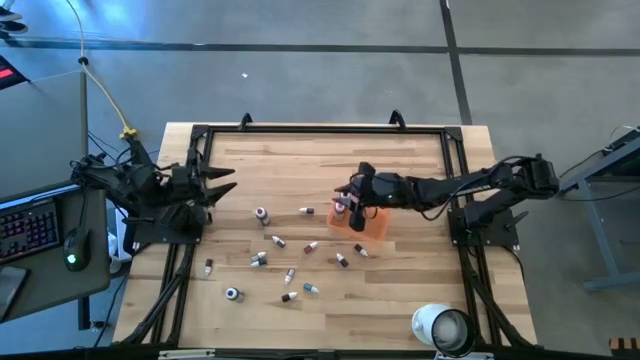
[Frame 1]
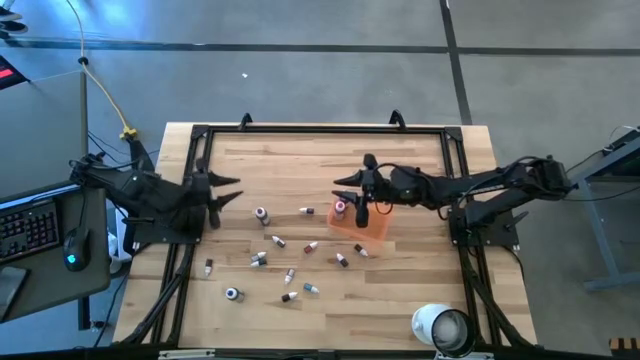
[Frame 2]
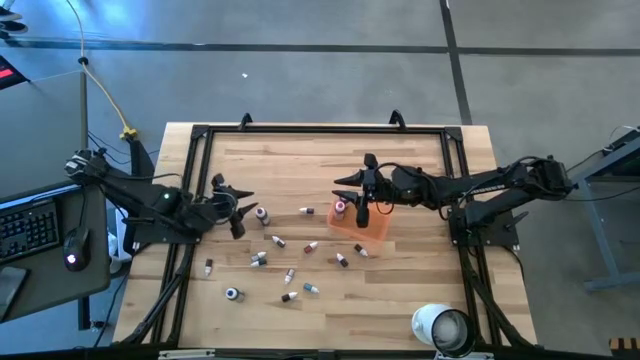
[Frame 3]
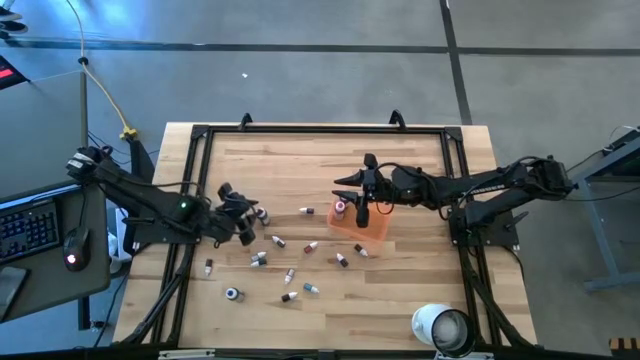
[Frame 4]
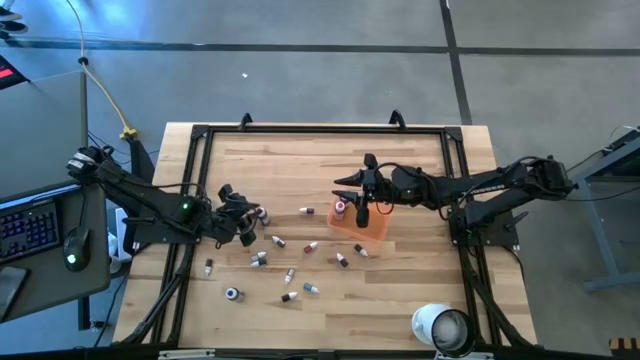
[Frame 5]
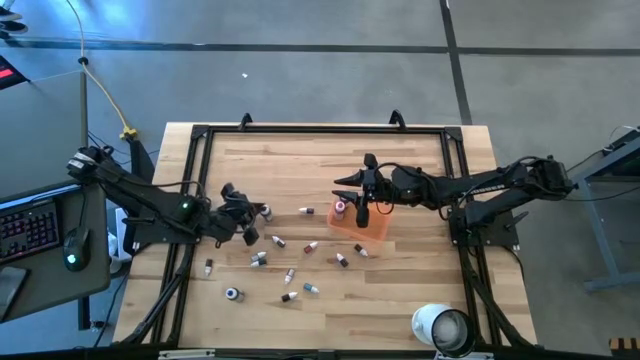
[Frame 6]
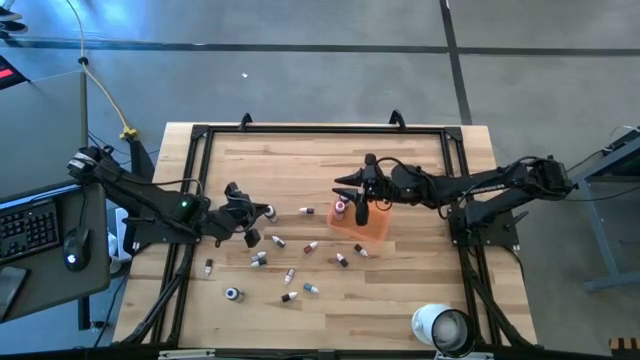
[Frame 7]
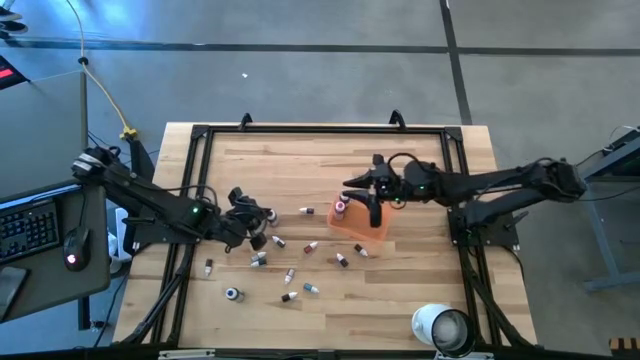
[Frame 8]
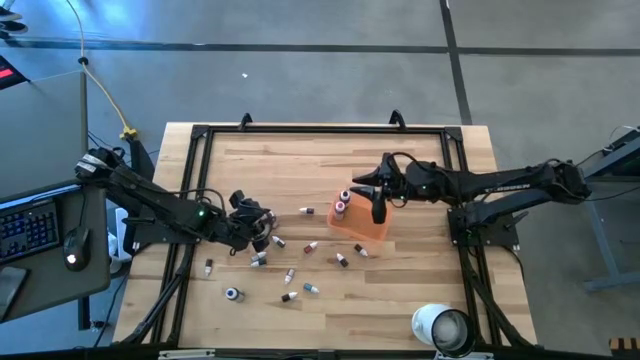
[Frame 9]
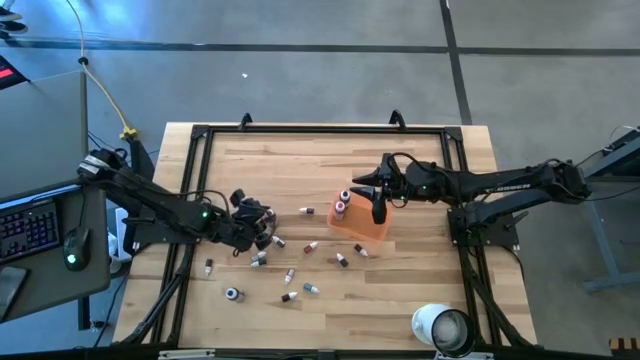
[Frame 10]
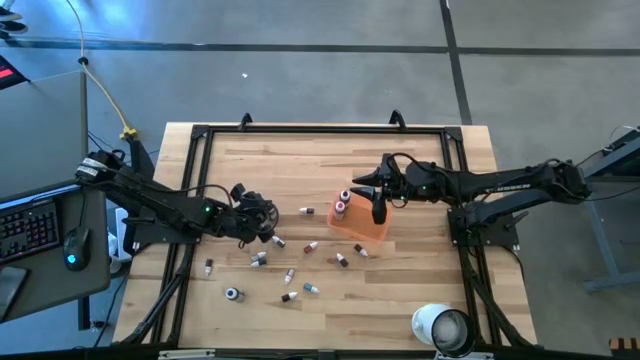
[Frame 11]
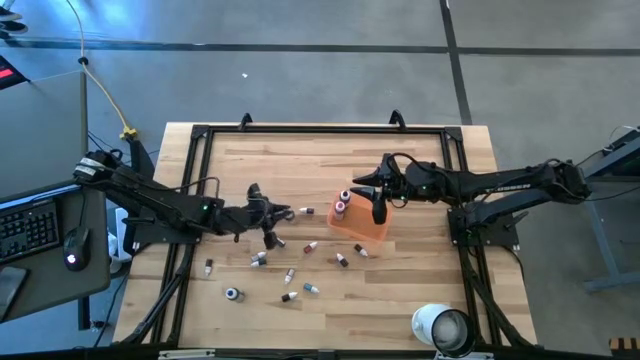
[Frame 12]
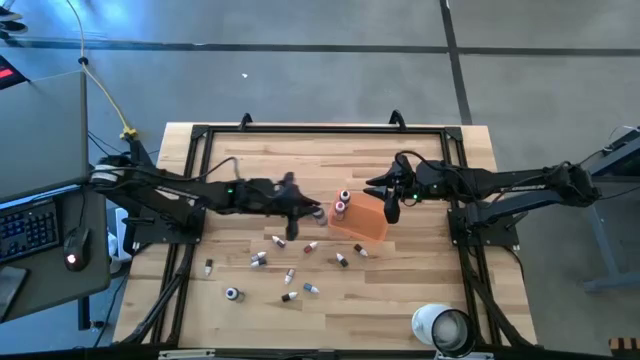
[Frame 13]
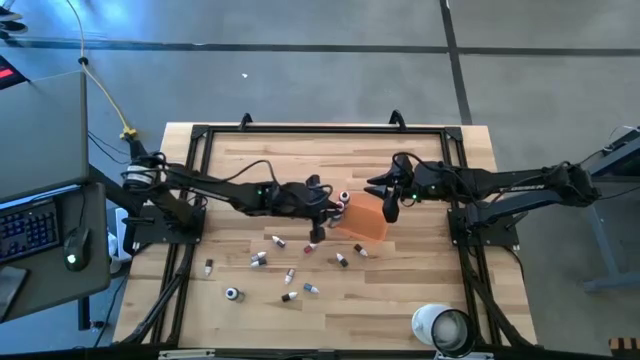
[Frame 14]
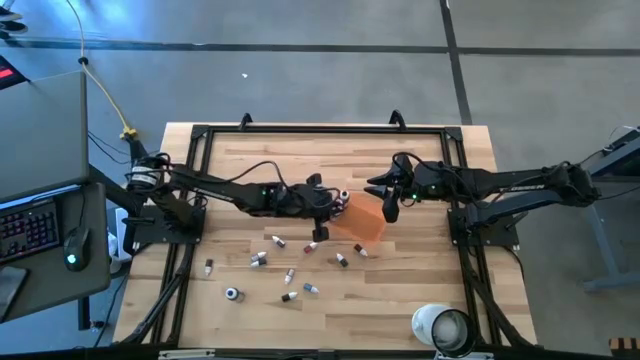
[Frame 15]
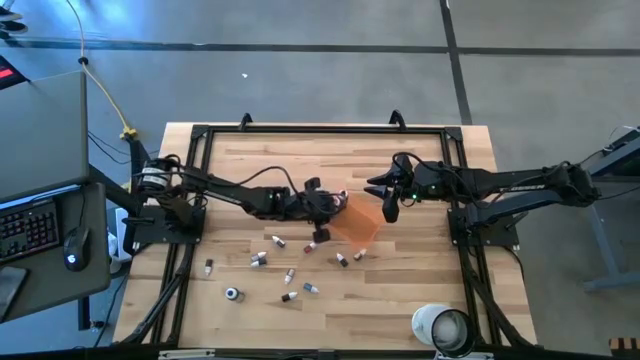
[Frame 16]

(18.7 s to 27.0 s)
Task: Pick & Place food coloring
Put the big violet food coloring bottle into the orange bin

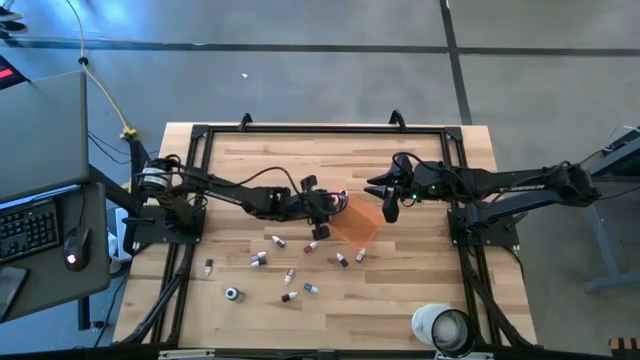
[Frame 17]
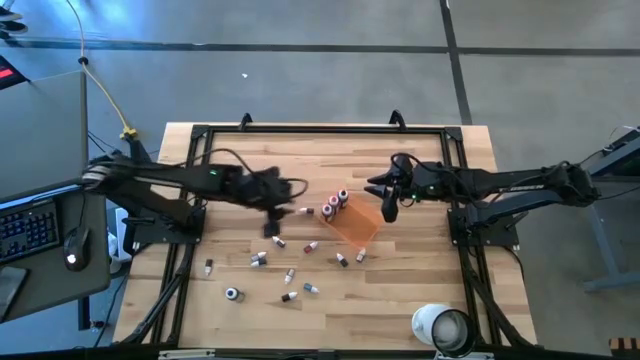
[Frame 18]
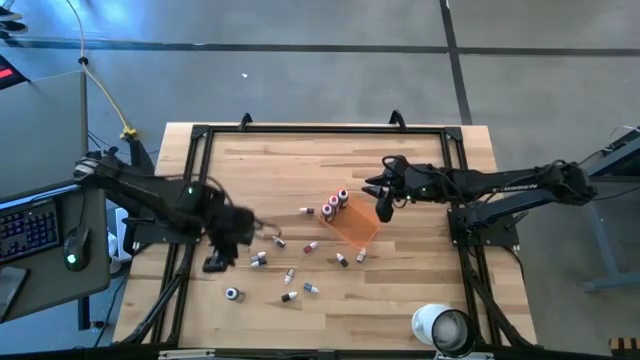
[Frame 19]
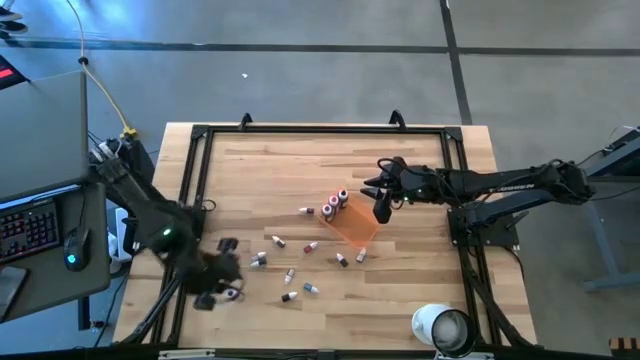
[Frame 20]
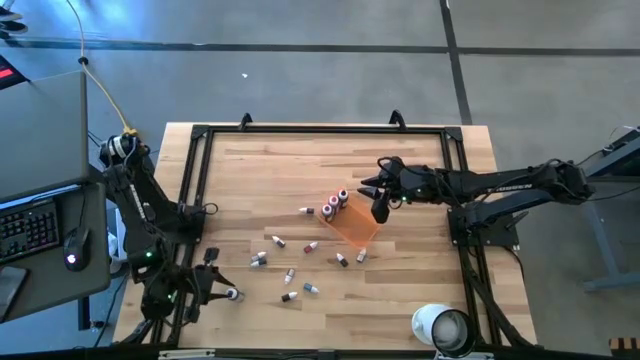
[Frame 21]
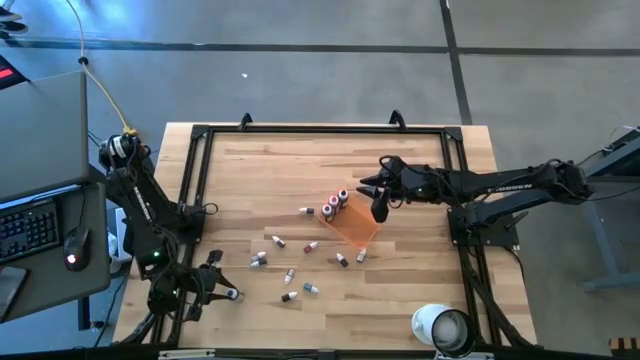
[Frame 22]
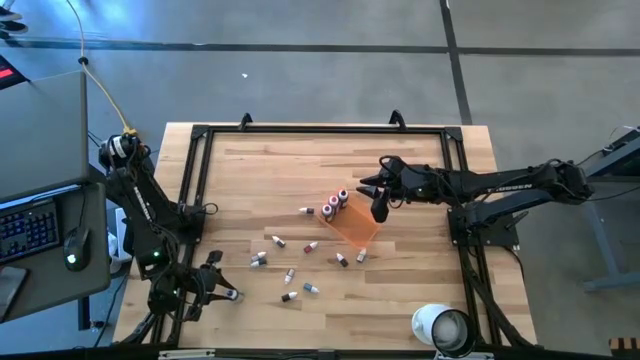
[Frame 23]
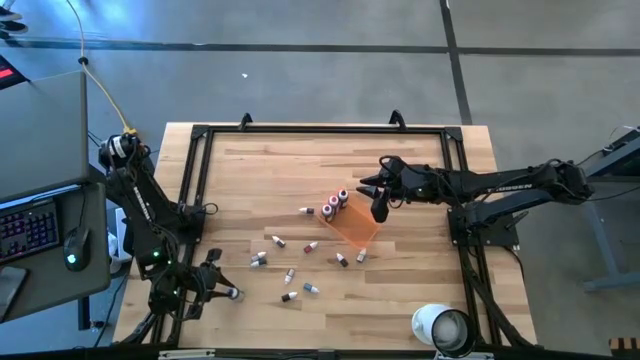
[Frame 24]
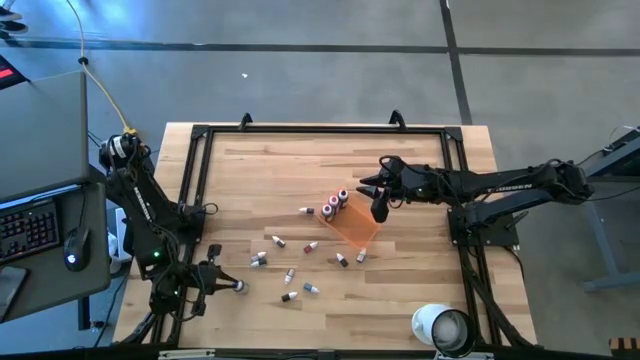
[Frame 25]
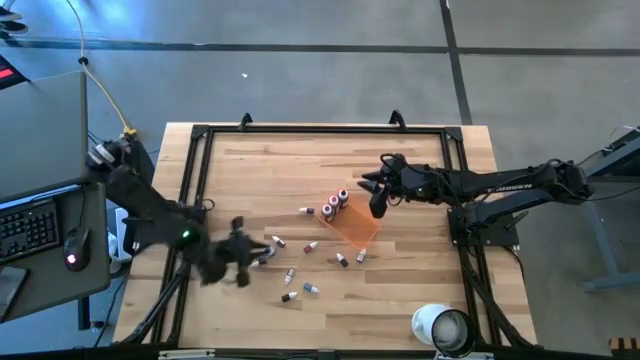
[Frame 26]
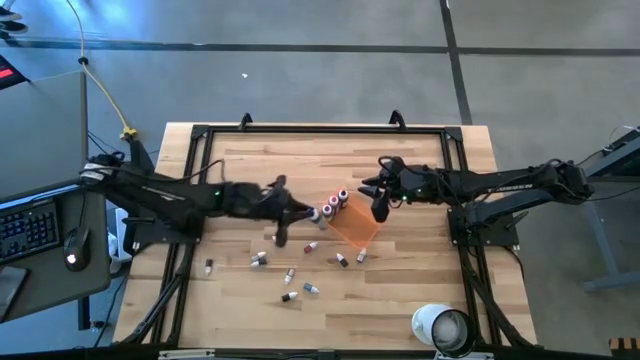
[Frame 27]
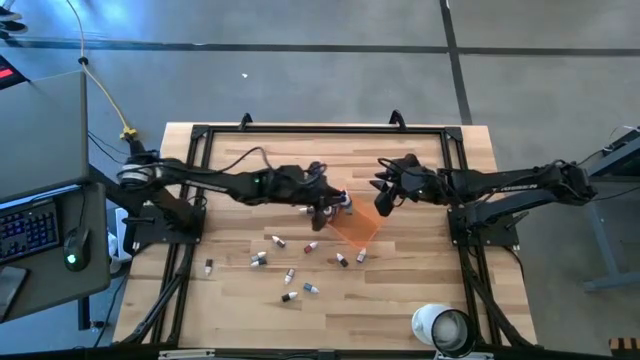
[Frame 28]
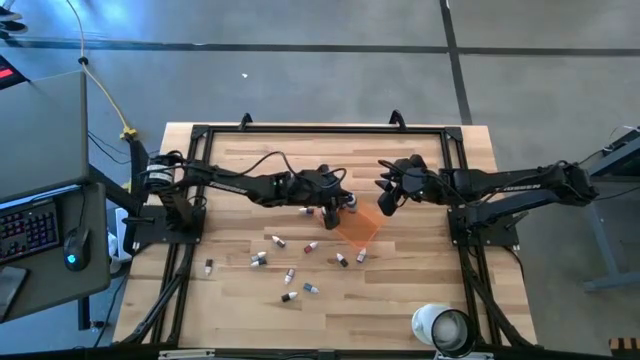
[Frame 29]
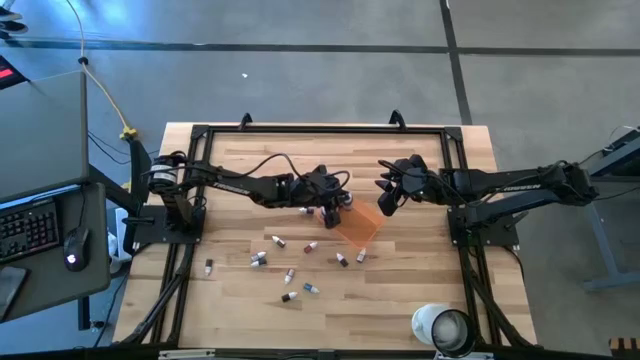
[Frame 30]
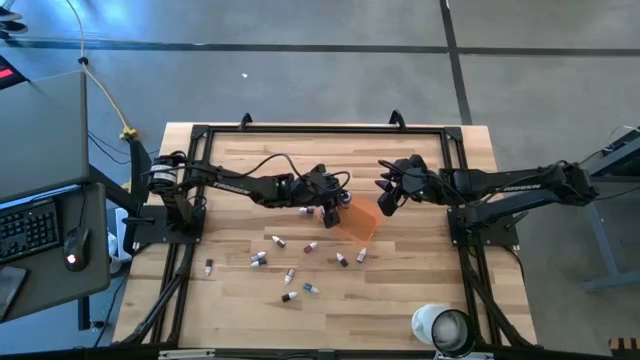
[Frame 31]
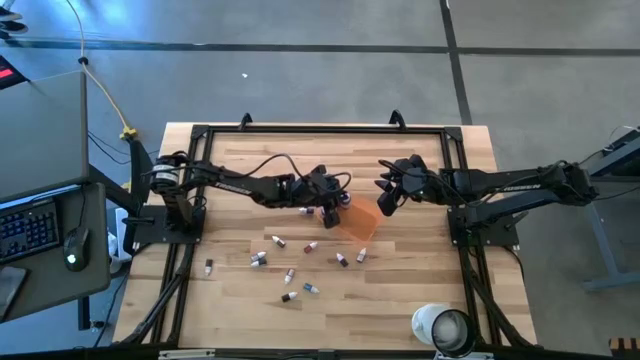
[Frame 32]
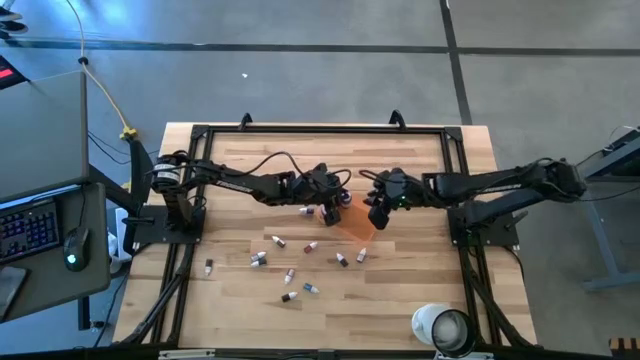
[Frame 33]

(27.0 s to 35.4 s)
Put the big blue food coloring bottle into the orange bin

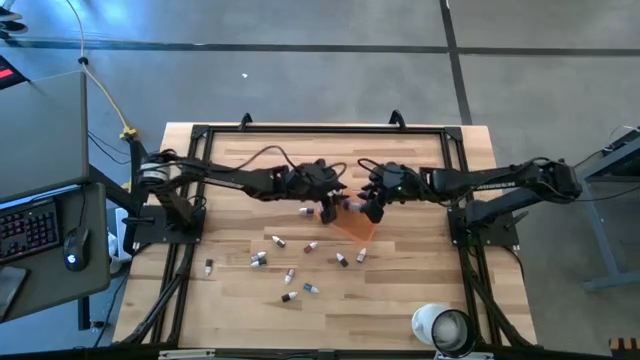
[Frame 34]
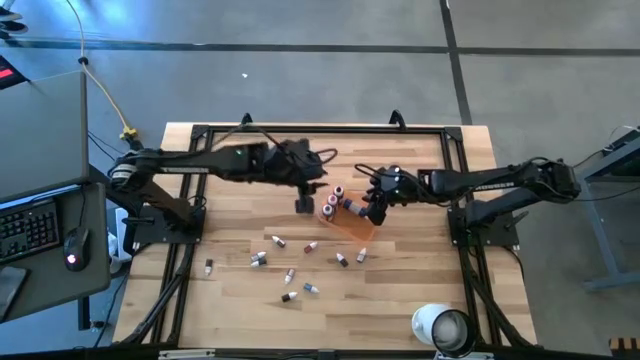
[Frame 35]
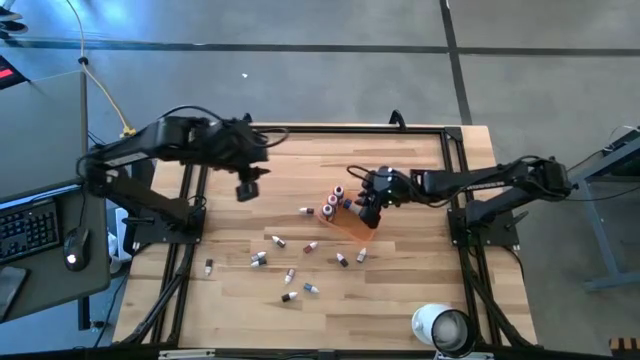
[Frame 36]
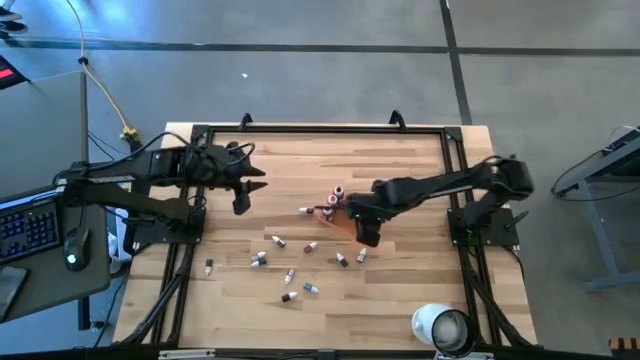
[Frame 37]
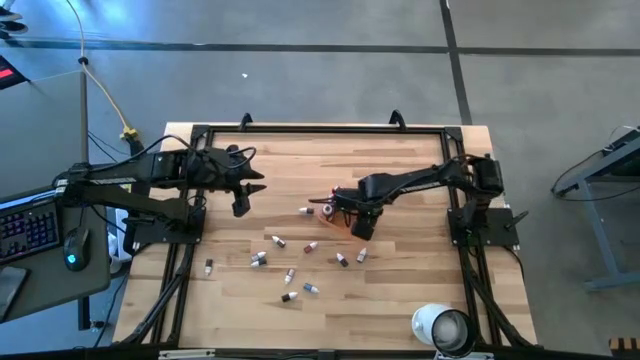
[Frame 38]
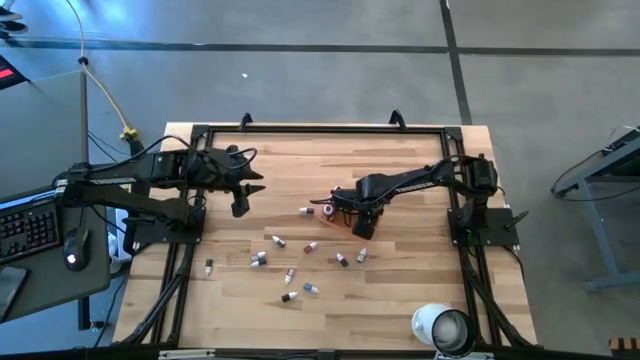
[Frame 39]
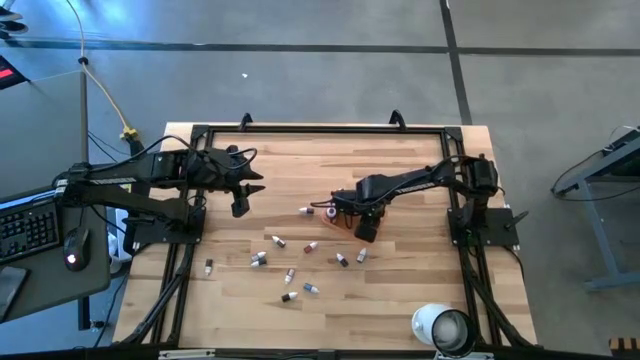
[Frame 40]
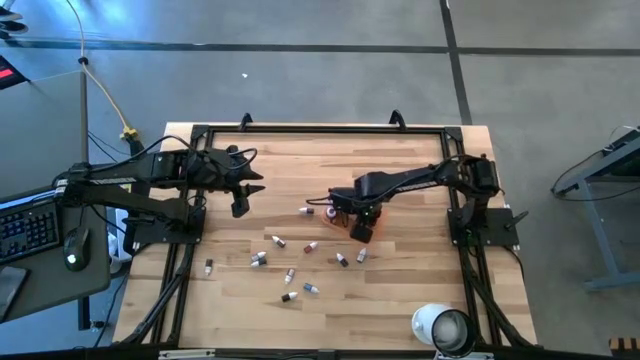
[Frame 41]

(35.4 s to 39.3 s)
Adjust the big blue food coloring bottle

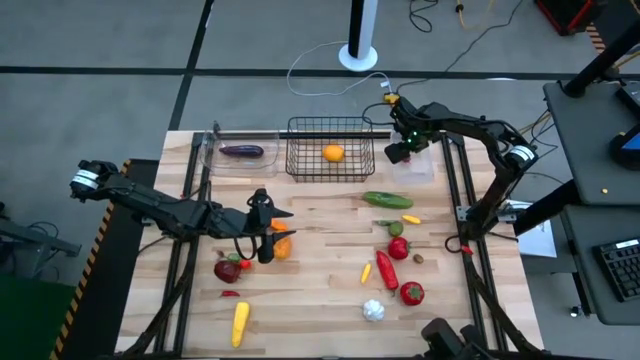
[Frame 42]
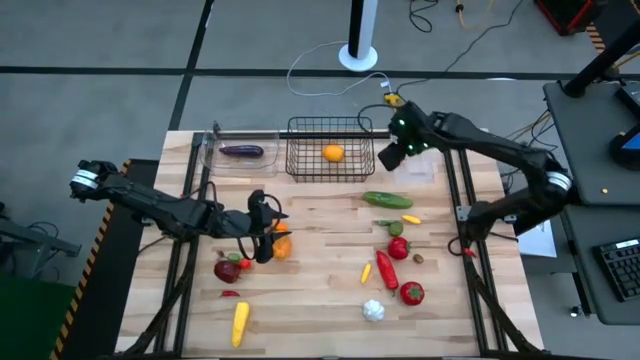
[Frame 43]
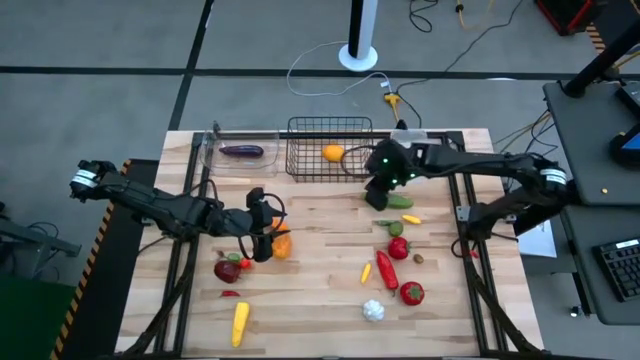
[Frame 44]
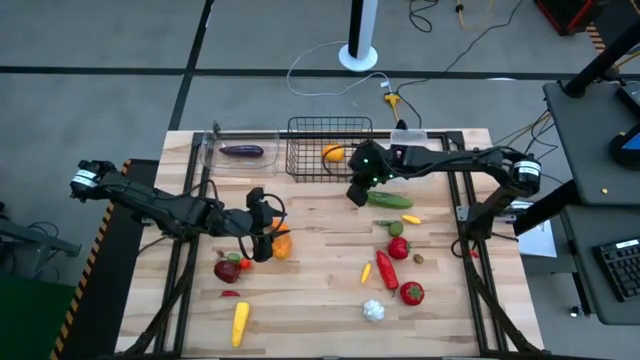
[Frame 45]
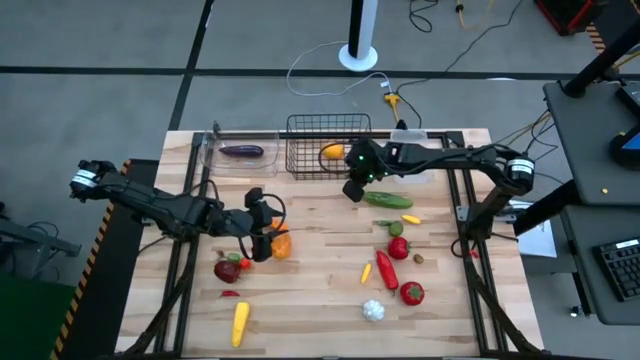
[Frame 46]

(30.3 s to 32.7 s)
Task: Sort produce into baskets
Adjust the wire basket
